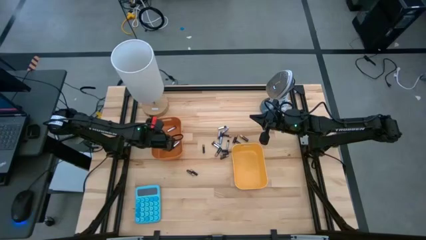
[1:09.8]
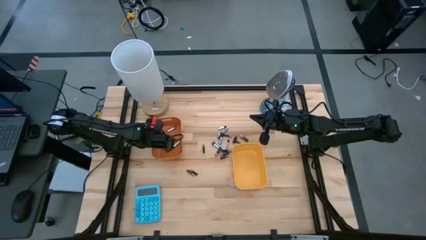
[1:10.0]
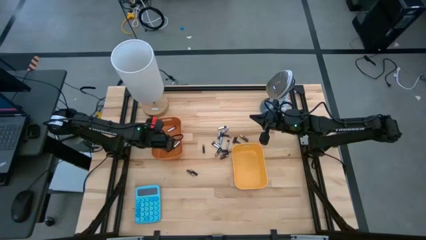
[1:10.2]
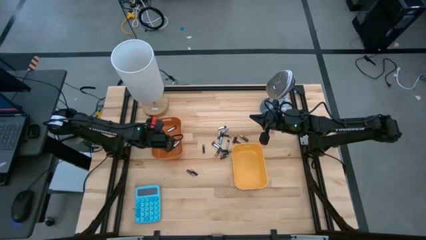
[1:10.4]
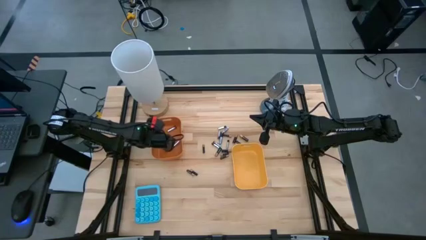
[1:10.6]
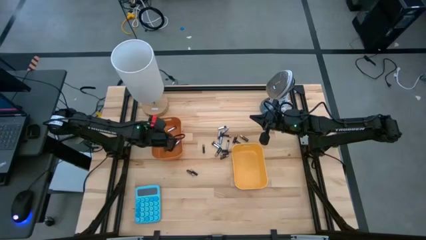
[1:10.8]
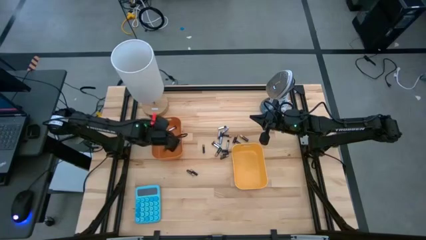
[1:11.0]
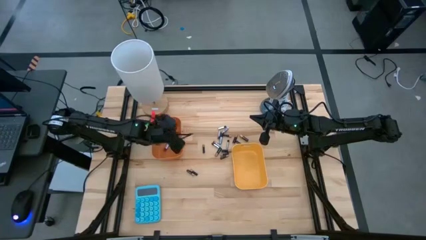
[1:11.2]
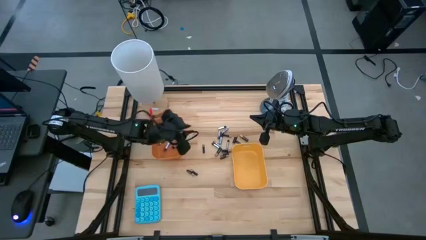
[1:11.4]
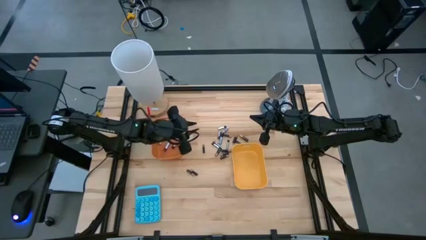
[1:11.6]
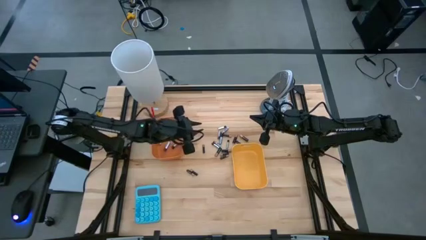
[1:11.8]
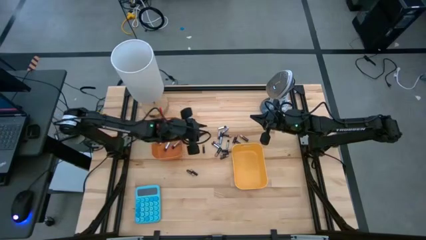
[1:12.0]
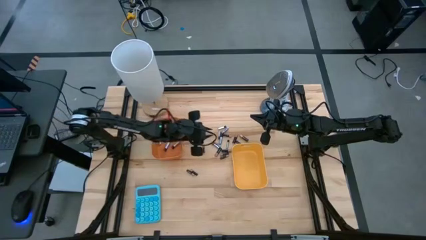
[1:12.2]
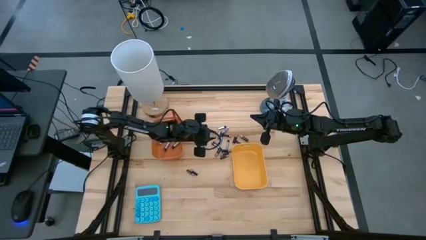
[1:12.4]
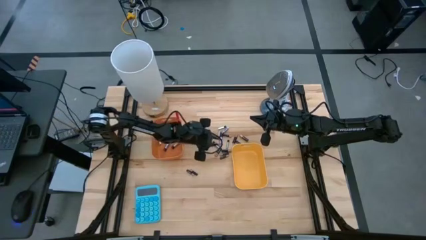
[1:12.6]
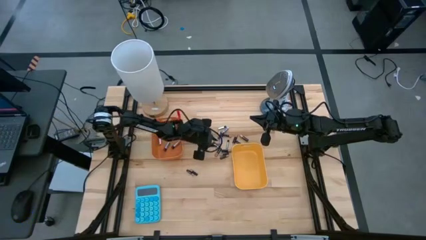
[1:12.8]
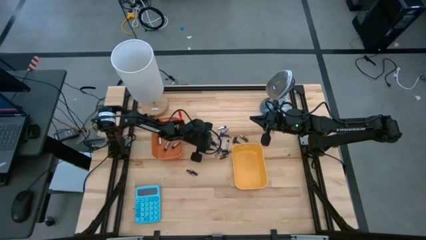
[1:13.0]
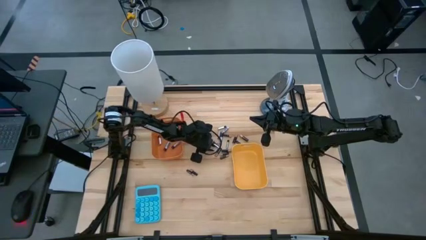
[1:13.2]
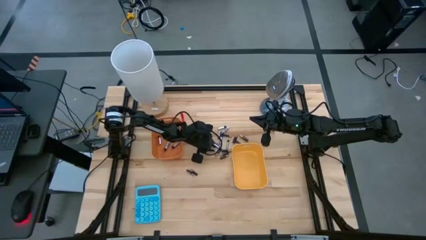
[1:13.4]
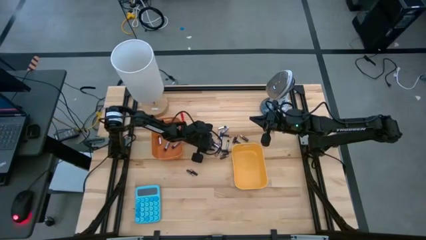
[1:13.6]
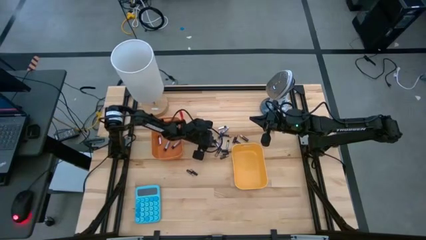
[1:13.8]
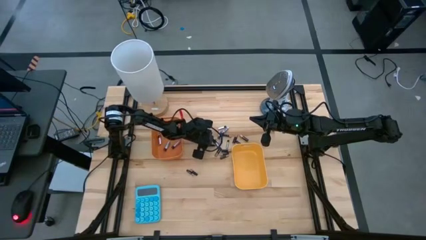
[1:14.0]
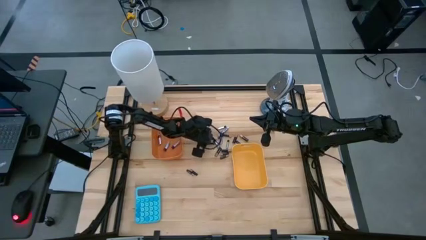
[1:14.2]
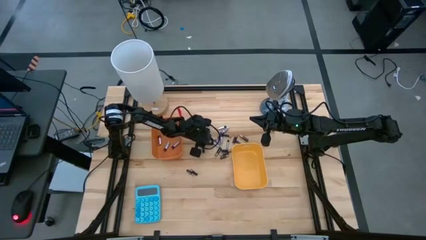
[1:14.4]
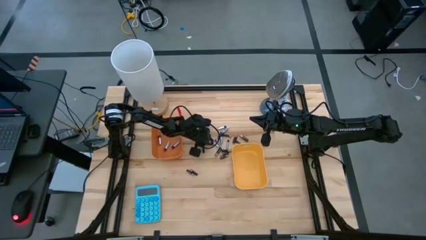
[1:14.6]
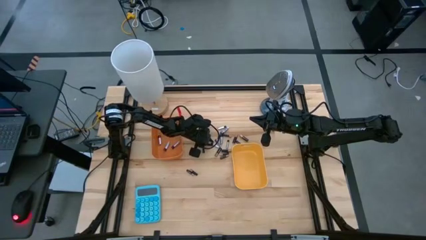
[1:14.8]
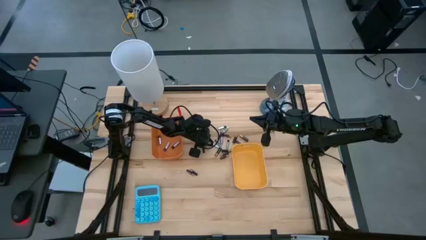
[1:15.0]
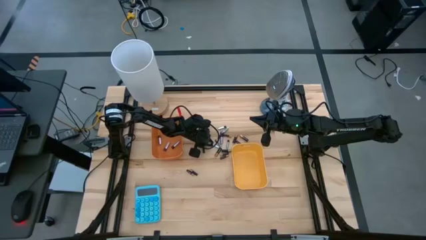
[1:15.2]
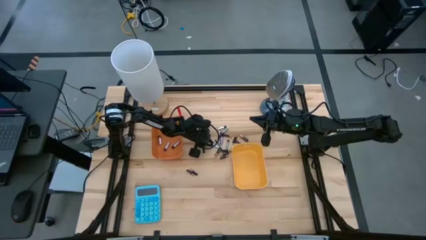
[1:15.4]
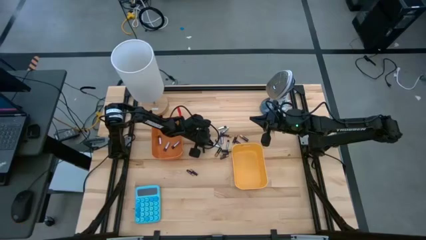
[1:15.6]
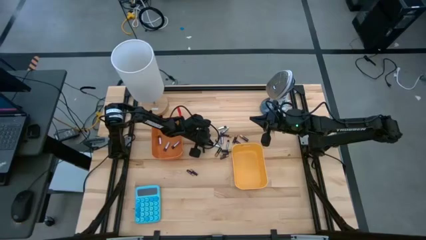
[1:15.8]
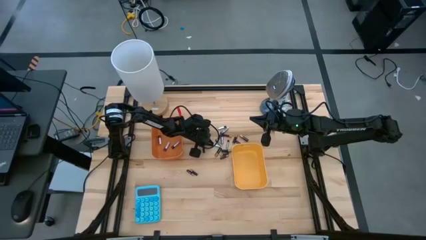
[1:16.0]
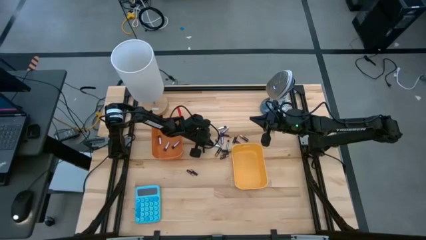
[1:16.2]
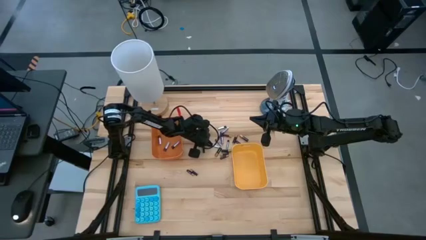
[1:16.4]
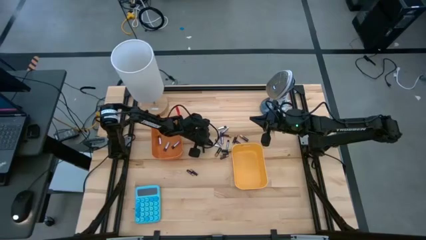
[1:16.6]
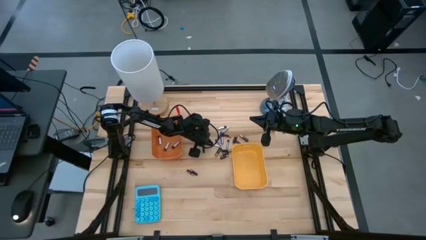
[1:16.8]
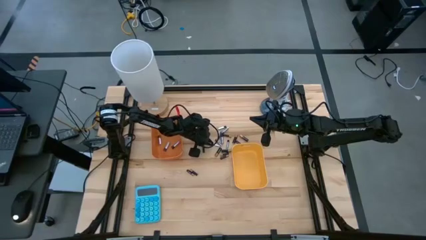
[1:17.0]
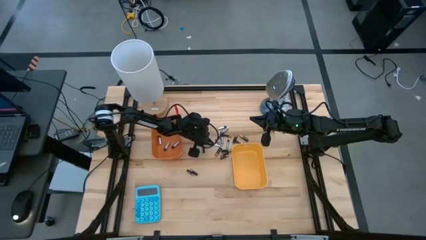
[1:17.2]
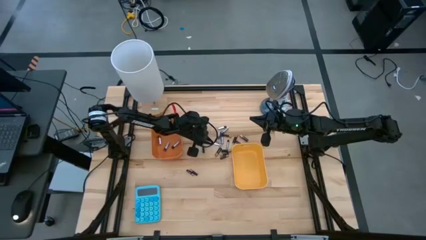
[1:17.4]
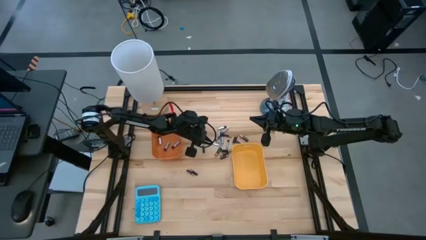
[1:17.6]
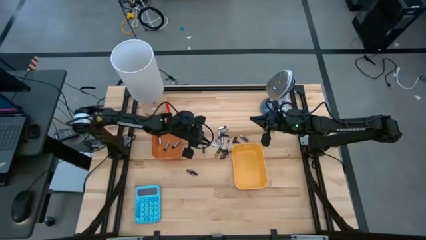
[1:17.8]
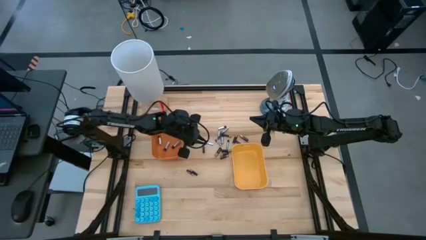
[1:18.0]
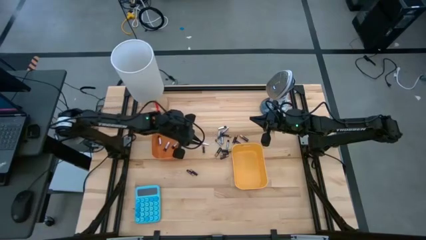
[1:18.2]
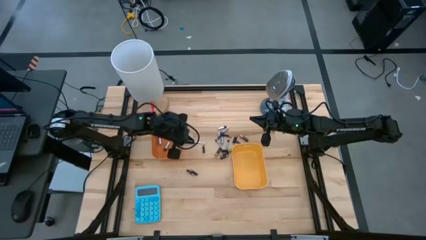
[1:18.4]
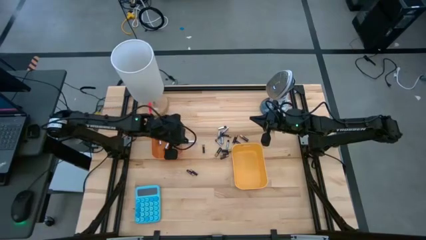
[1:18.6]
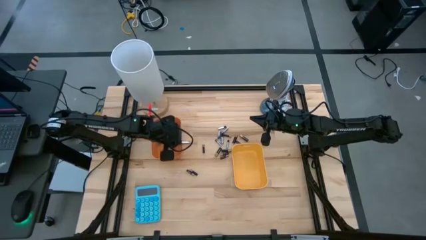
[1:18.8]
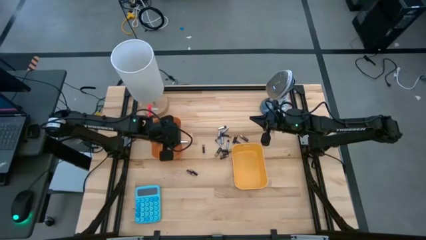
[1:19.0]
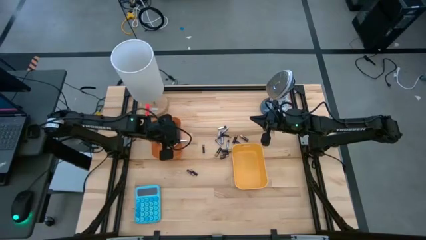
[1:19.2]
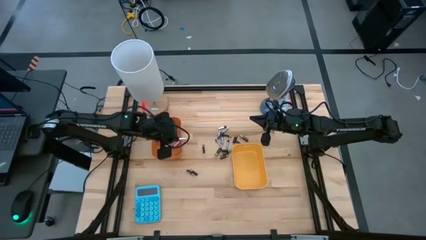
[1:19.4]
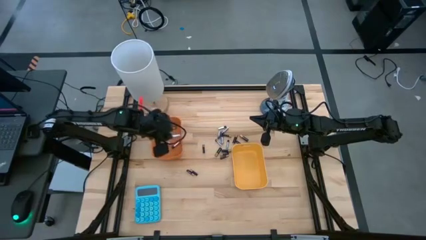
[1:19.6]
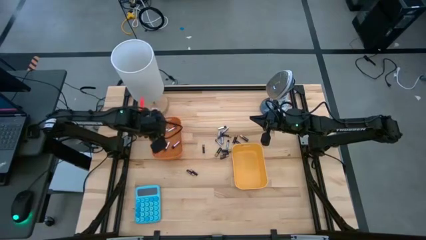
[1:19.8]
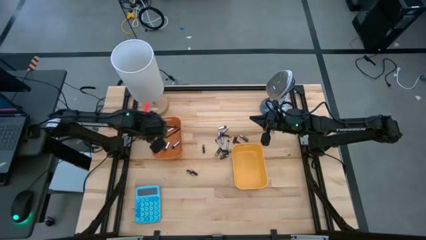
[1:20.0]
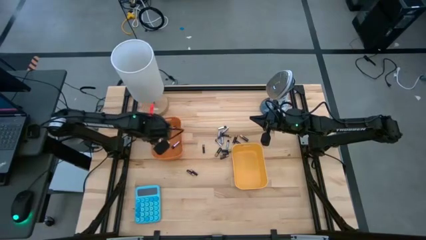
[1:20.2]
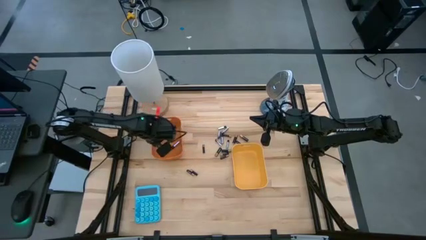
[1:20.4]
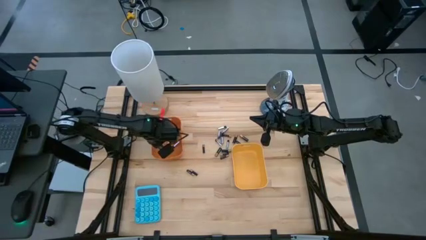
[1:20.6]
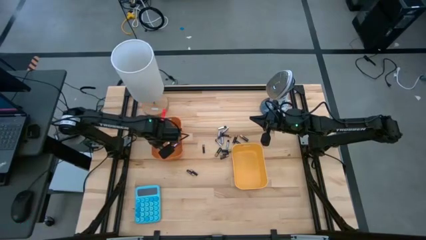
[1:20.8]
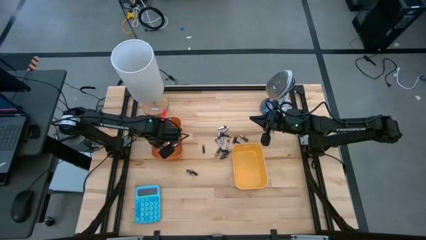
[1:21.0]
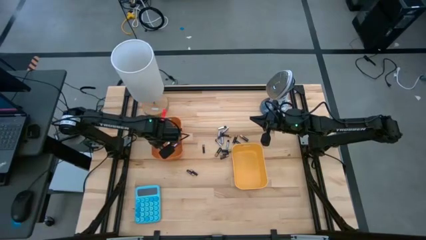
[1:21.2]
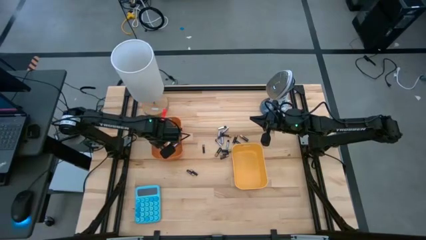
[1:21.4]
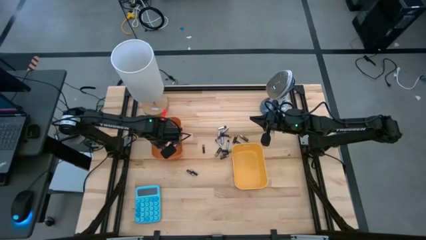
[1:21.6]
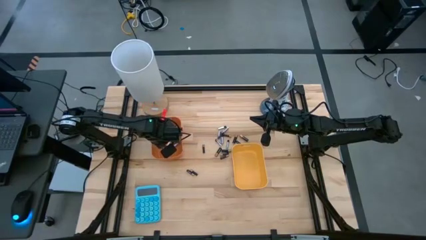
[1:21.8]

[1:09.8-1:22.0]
Task: Sort batteries
Put the silver battery into the orange bin

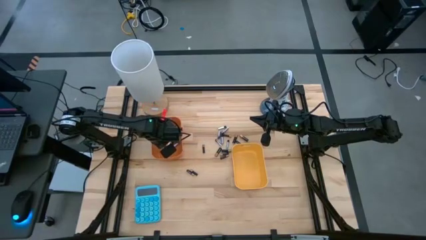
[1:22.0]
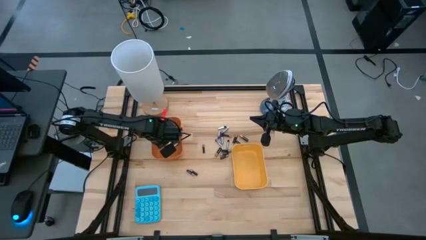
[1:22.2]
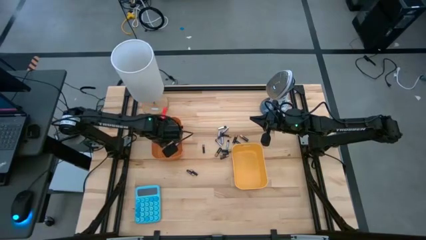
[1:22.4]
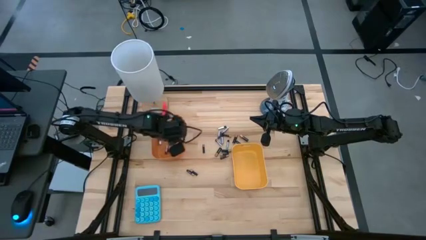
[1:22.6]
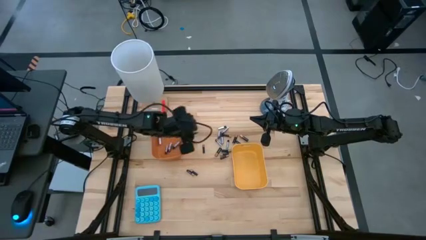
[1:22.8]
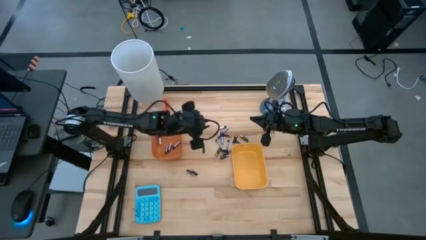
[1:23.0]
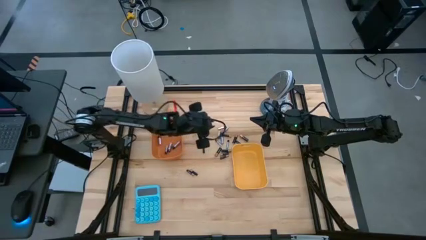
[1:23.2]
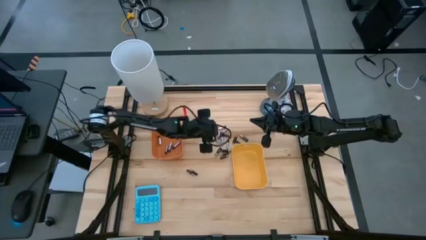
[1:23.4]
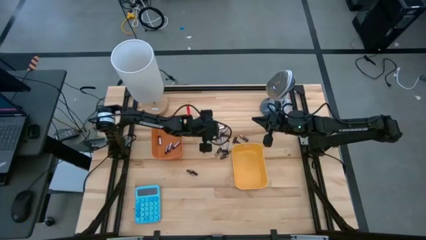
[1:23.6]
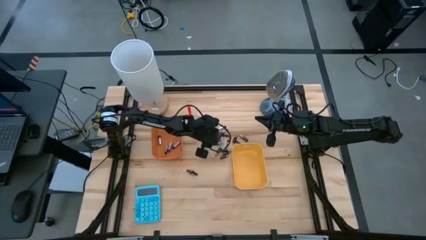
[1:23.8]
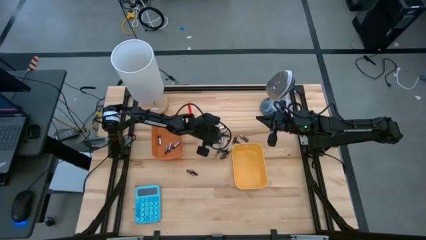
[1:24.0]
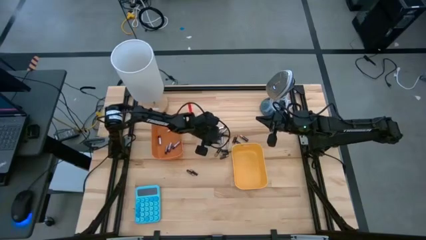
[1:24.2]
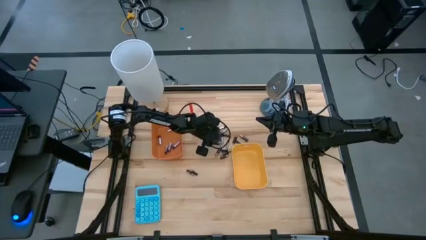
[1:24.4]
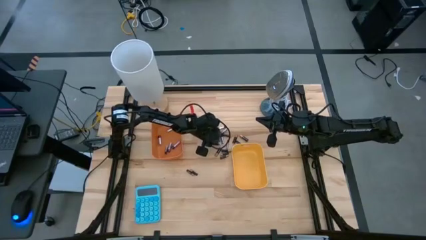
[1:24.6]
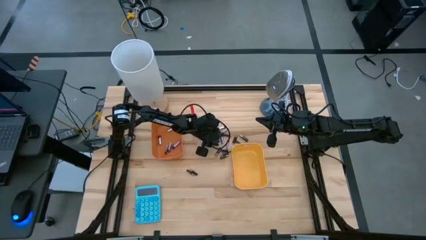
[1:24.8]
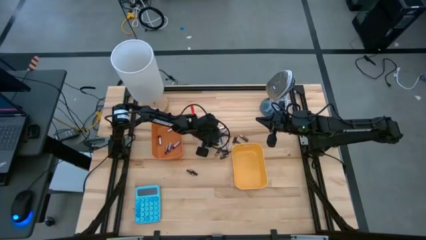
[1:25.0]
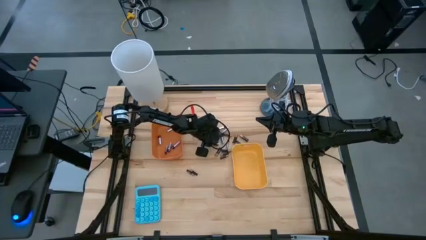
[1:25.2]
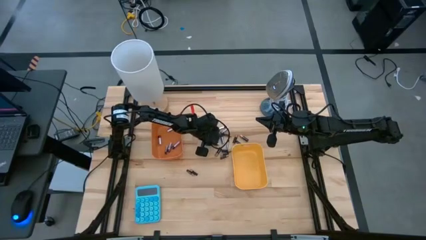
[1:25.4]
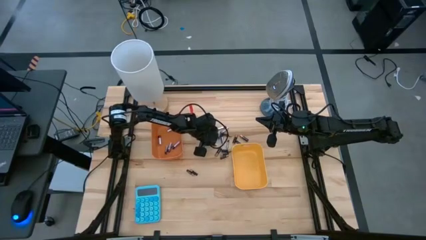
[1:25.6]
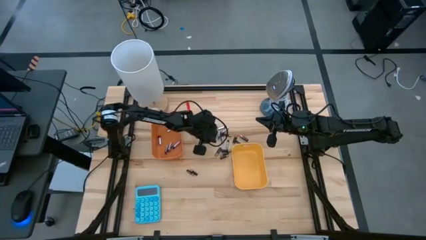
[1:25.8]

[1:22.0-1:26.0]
Put the silver battery into the orange bin

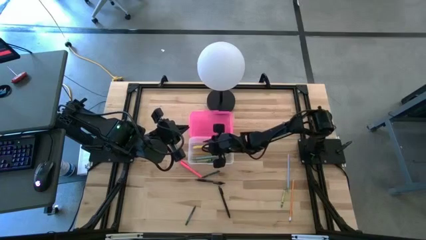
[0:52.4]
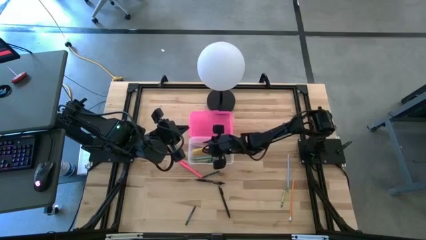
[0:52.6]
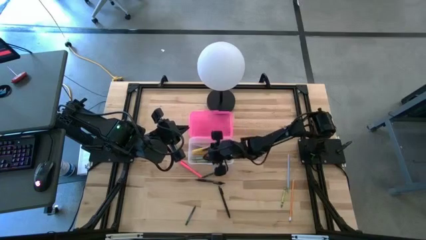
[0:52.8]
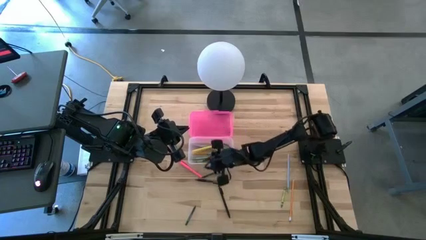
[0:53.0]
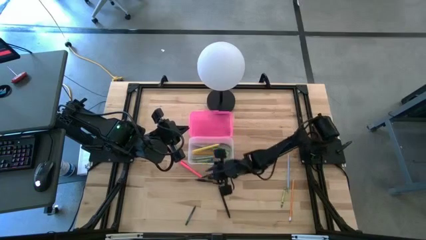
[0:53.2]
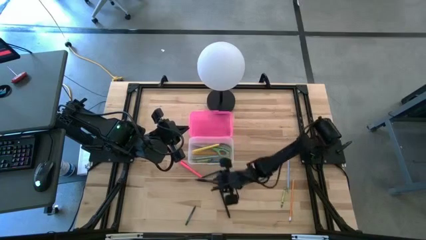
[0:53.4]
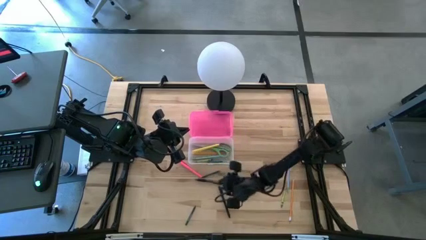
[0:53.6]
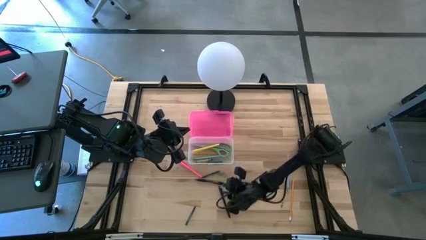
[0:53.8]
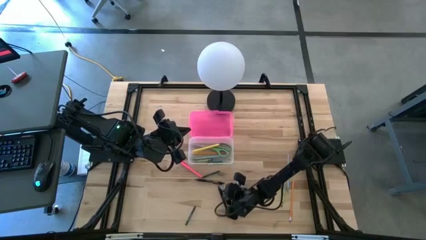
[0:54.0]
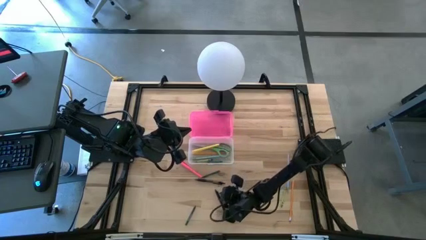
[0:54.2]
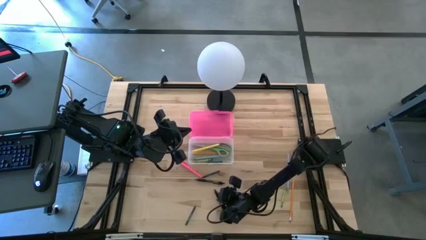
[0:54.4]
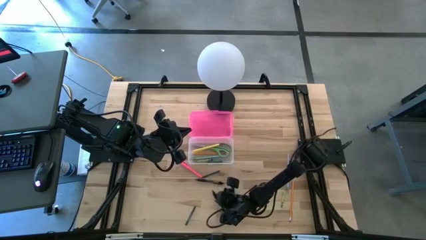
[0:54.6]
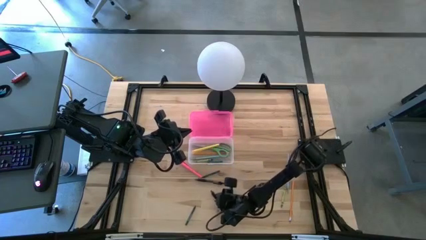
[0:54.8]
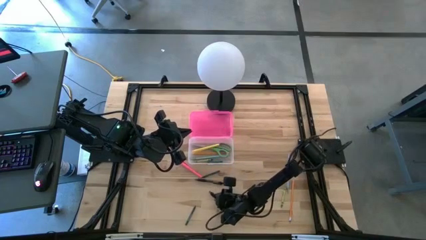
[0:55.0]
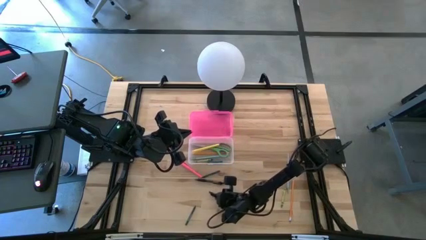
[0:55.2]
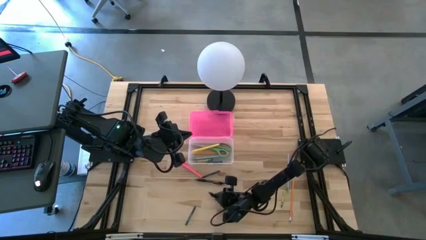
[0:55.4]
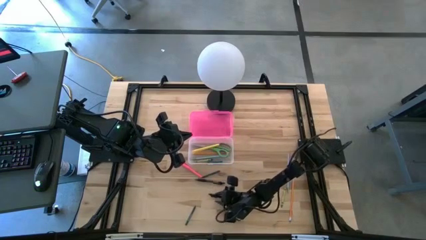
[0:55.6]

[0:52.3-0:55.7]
Task: Pick & place school supplies into a supply box
Put the bottom black pen into the pink supply box
